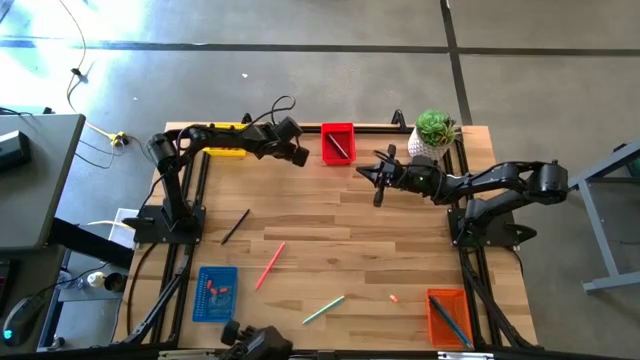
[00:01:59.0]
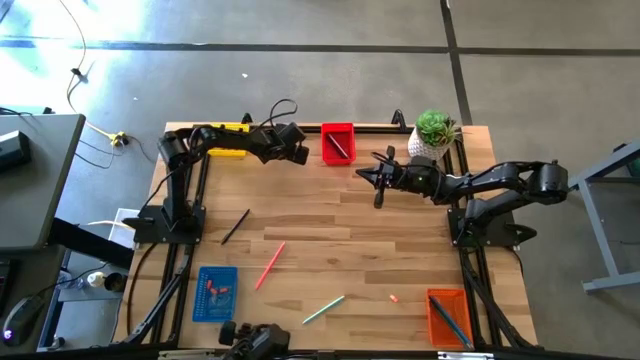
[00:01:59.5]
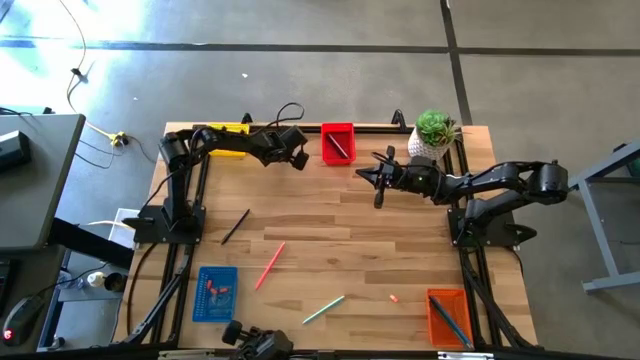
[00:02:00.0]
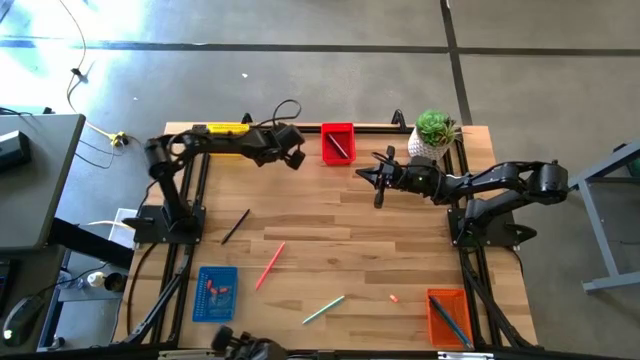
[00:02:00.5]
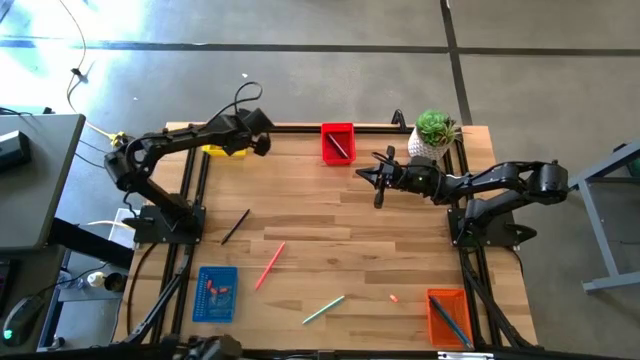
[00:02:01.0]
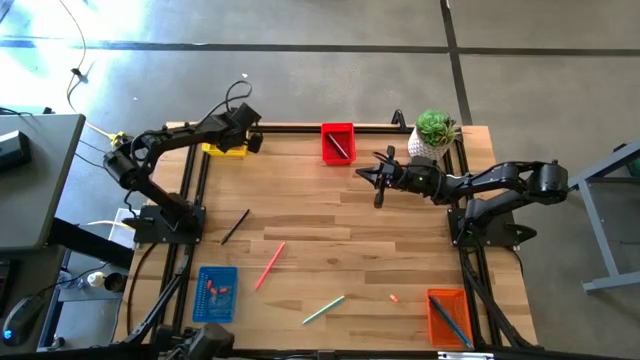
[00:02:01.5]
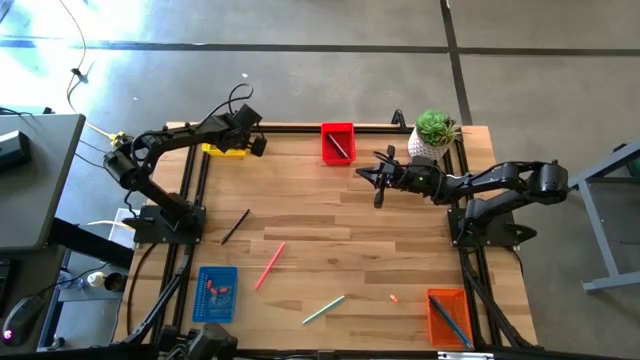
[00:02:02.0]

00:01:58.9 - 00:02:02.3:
Task: Sort crayons/erasers/pens/pencils in bins
Put the red crayon into the yellow bin

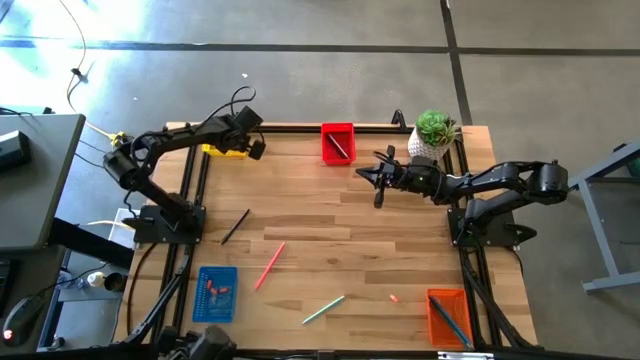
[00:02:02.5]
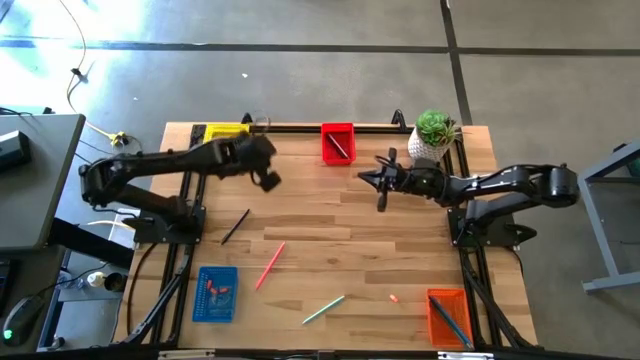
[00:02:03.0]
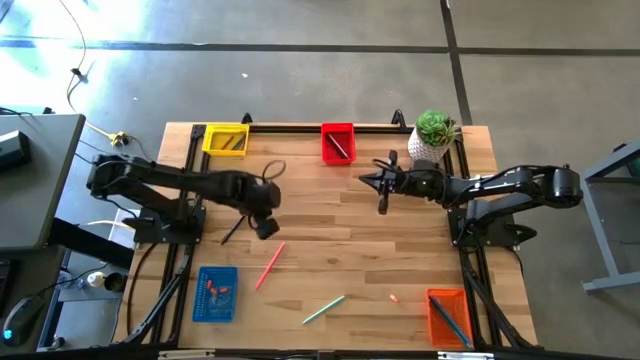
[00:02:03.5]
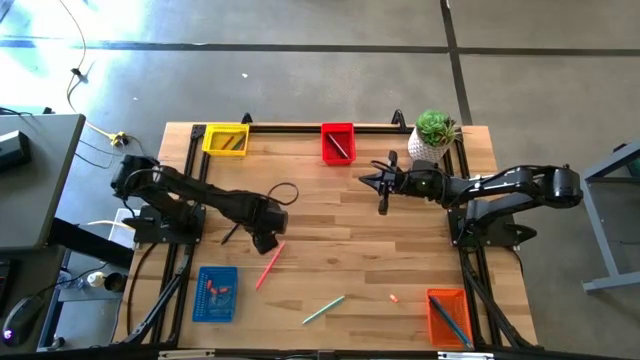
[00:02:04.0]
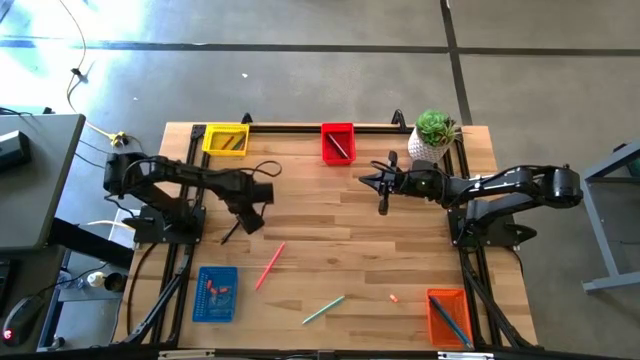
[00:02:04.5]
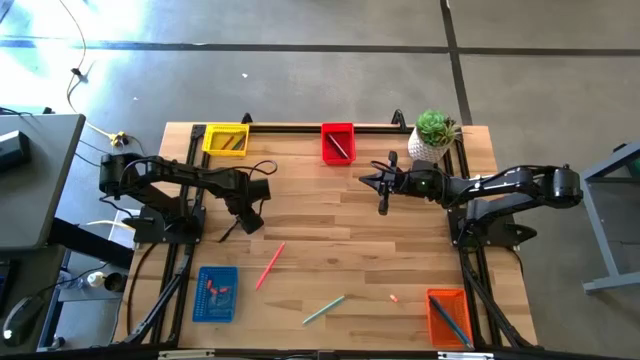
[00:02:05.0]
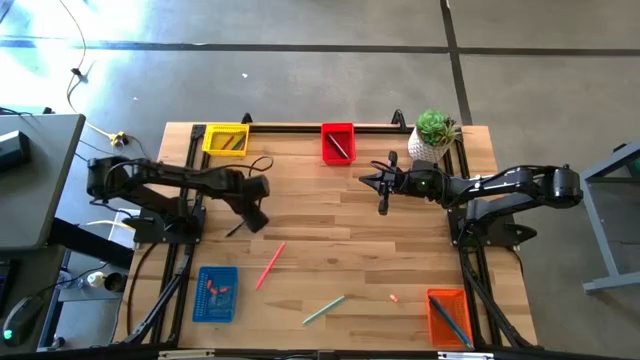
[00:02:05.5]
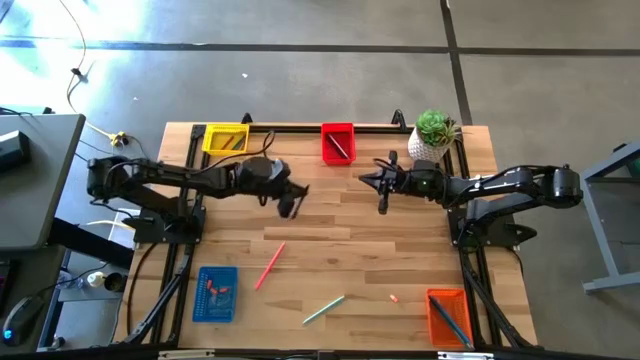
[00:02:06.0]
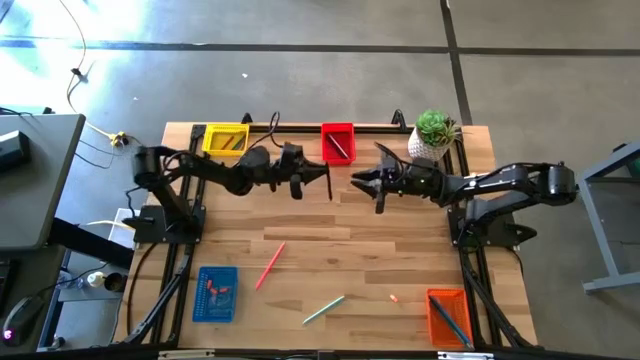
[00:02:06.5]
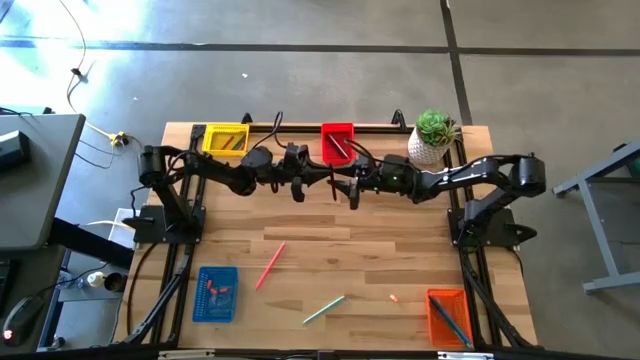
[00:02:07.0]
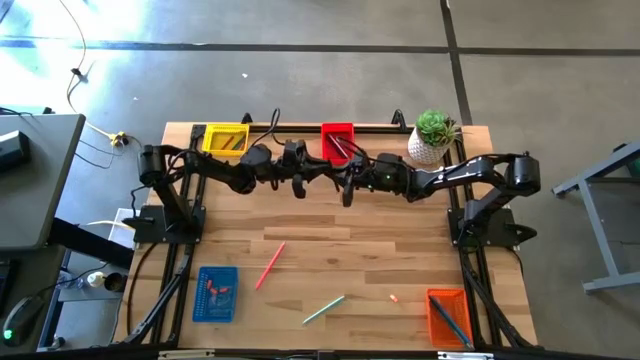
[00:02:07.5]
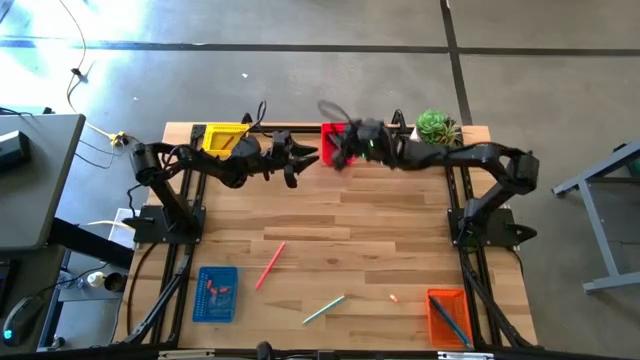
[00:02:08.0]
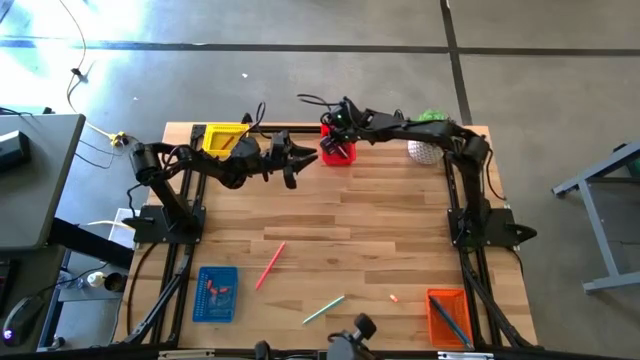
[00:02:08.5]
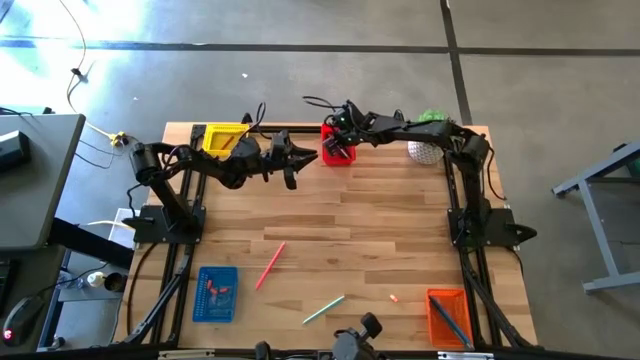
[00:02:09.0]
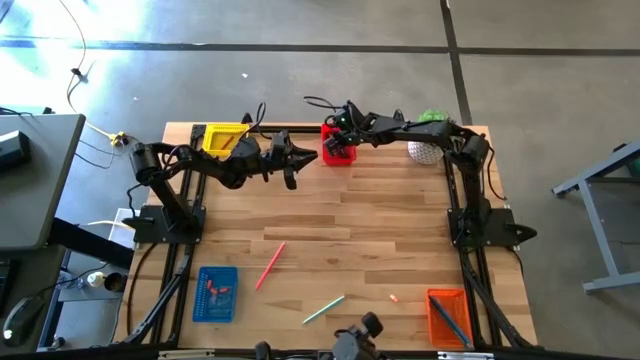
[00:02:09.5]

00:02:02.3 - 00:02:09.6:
Put the black pen into the red bin

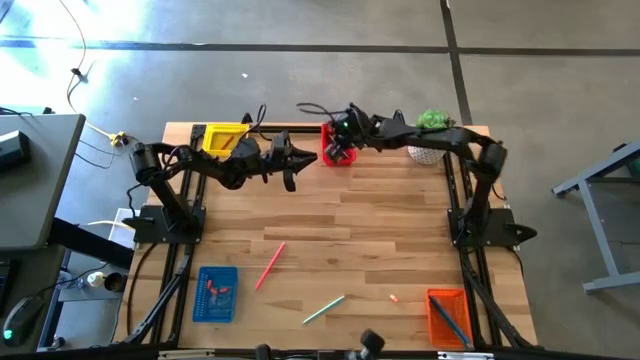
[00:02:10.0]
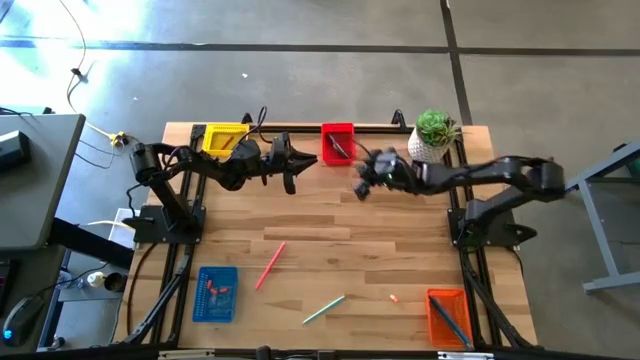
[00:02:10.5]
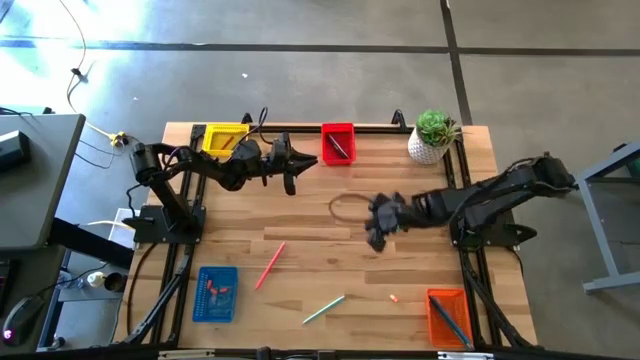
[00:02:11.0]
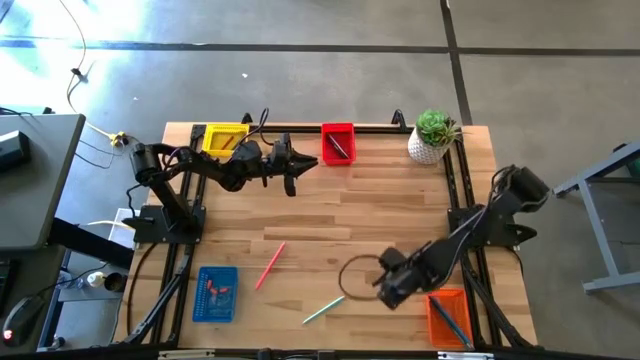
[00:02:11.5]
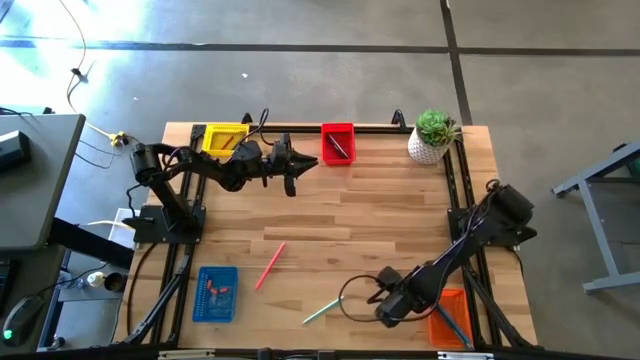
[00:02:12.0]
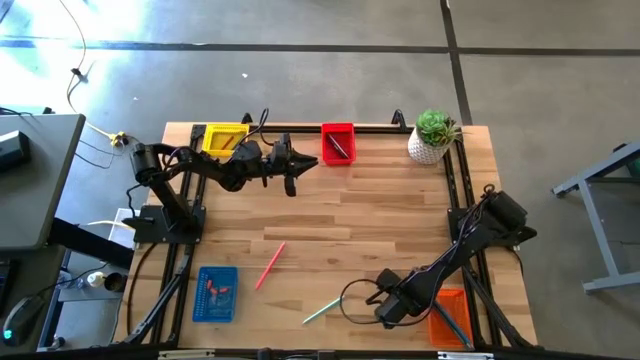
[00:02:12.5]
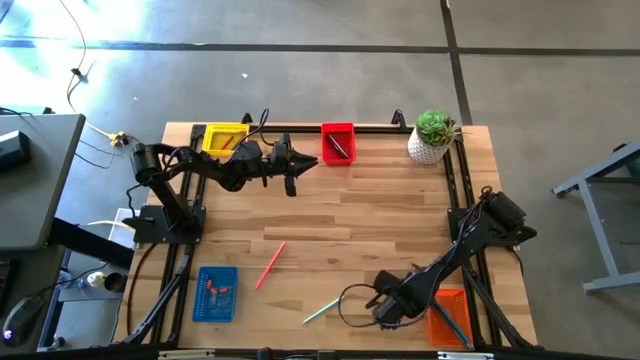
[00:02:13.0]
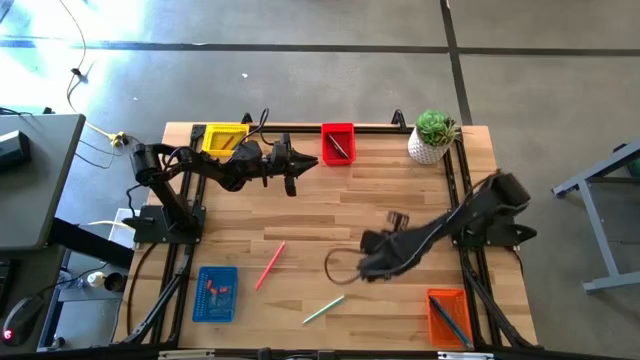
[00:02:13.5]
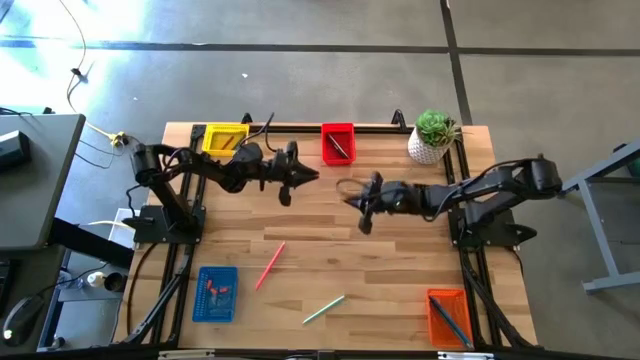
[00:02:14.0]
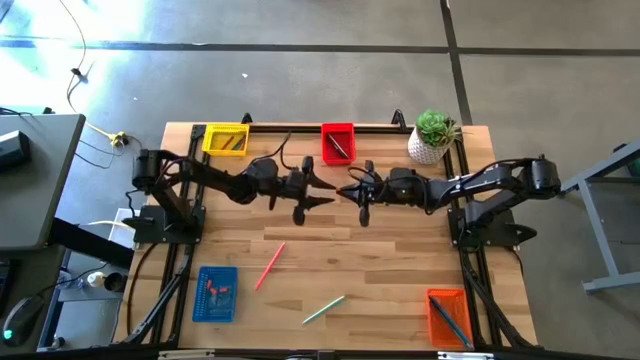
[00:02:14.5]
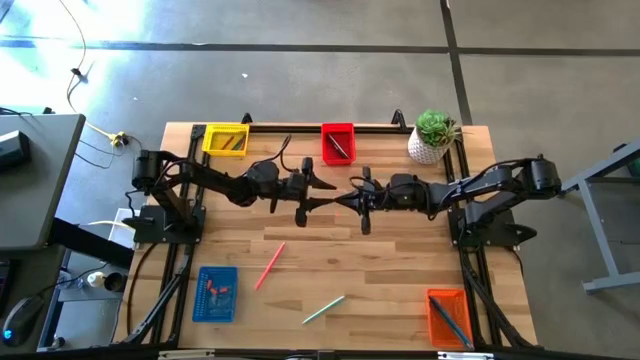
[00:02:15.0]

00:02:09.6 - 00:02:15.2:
Put the orange eraser into the blue bin

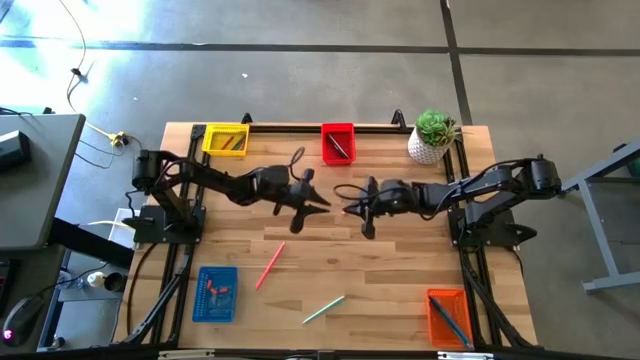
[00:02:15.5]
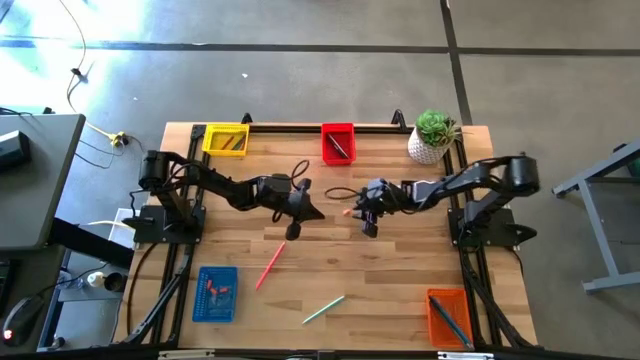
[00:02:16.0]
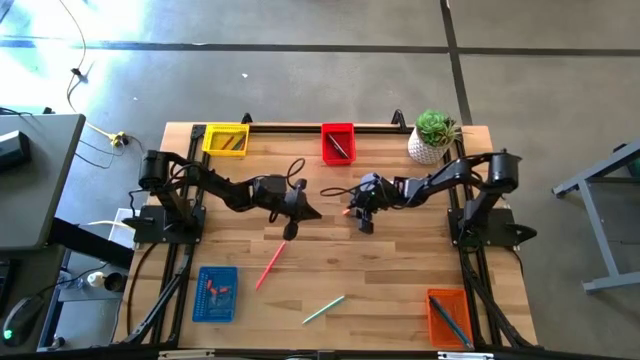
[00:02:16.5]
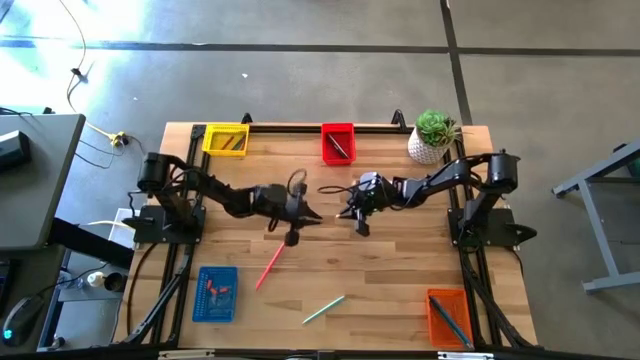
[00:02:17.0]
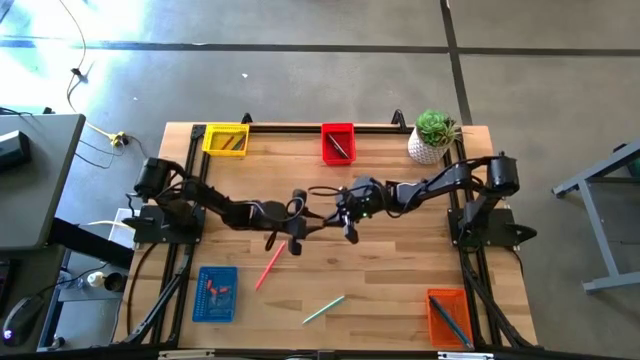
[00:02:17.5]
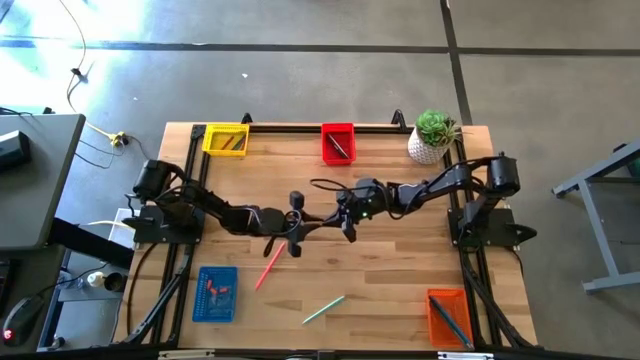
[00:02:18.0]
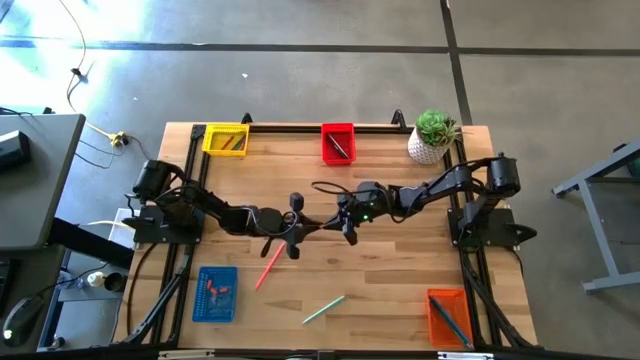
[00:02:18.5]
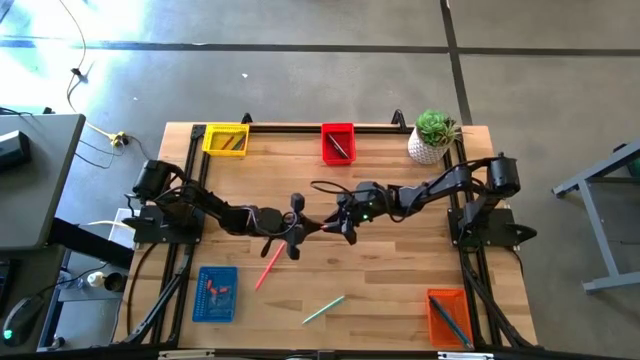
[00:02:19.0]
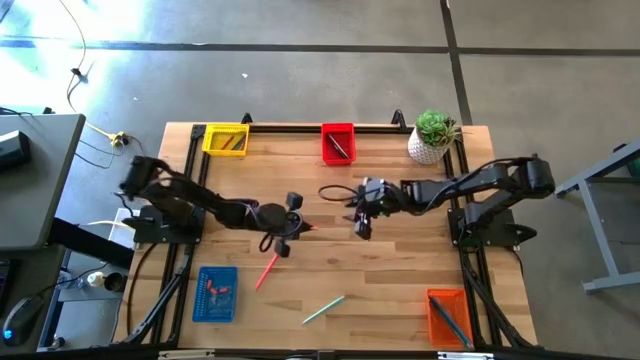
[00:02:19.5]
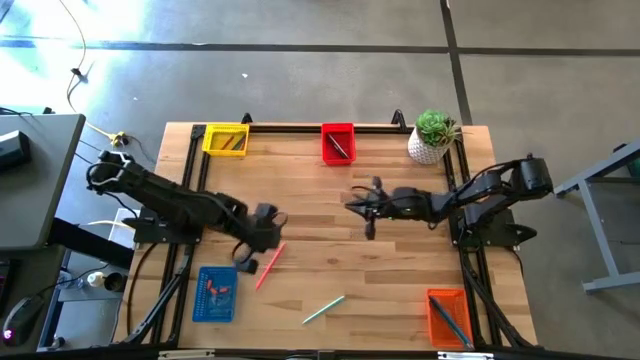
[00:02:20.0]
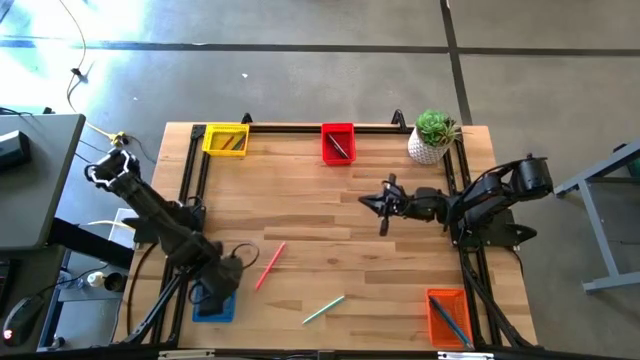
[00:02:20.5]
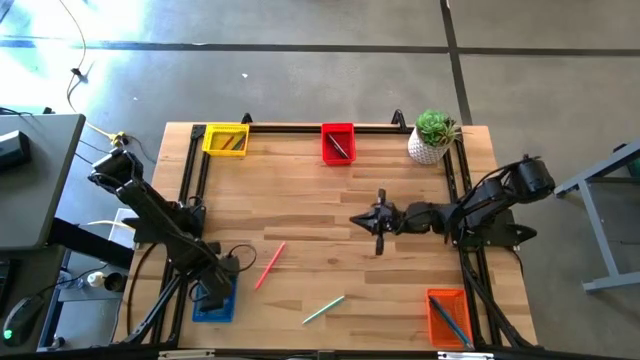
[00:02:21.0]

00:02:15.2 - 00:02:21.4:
Put the orange eraser into the blue bin
